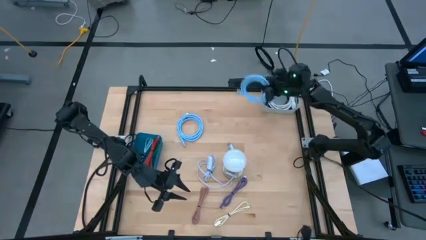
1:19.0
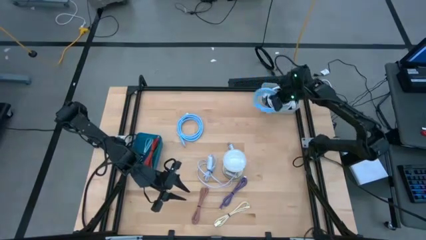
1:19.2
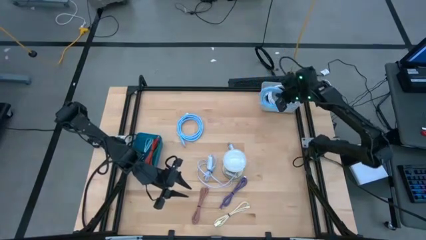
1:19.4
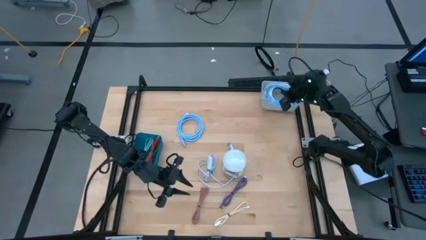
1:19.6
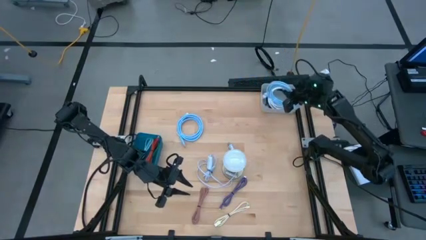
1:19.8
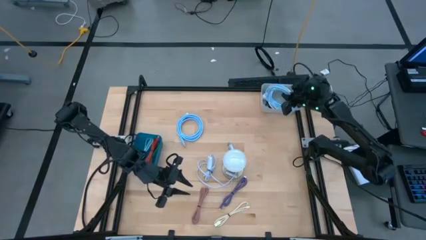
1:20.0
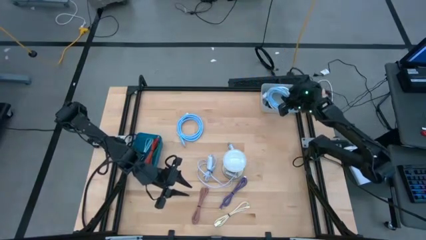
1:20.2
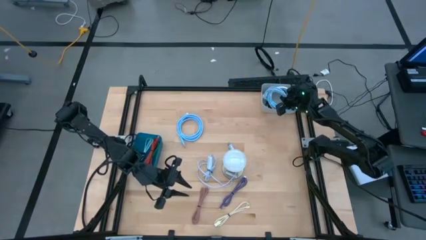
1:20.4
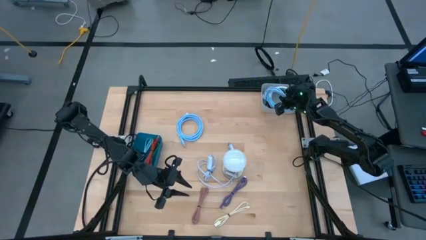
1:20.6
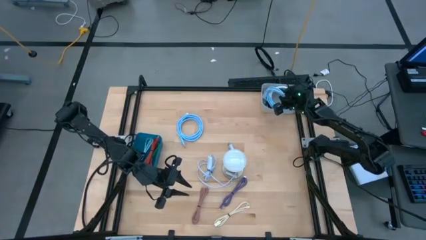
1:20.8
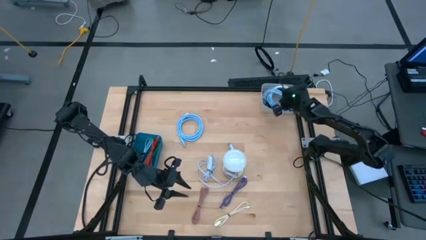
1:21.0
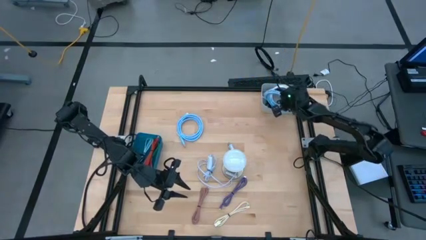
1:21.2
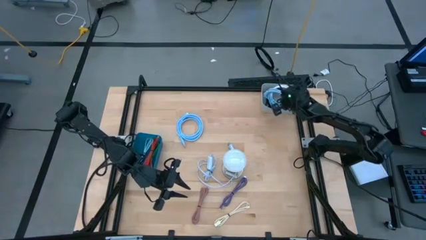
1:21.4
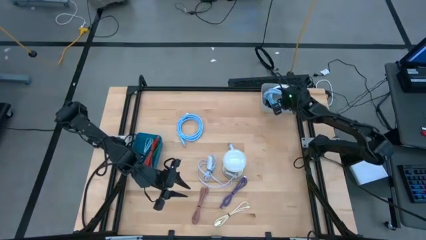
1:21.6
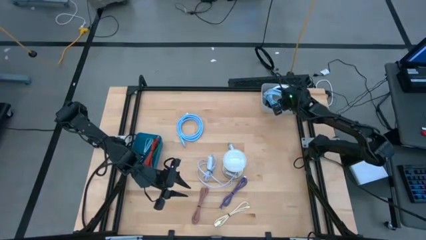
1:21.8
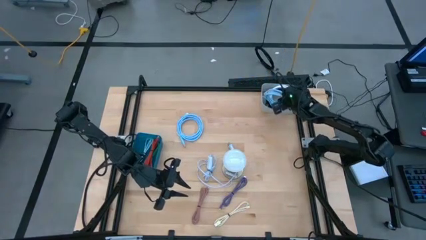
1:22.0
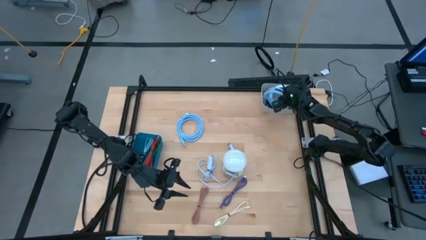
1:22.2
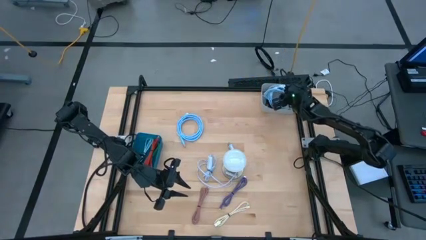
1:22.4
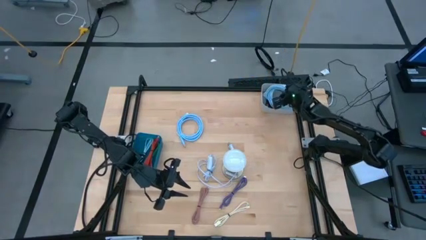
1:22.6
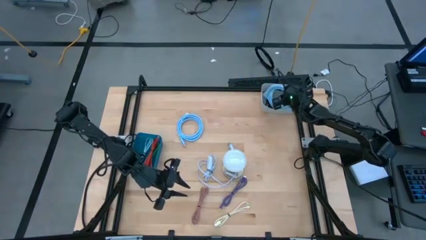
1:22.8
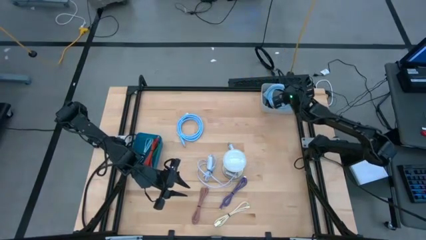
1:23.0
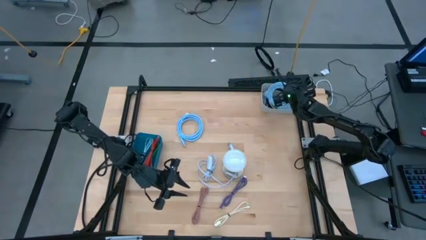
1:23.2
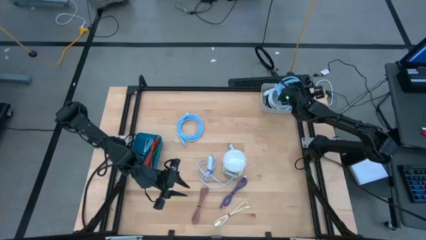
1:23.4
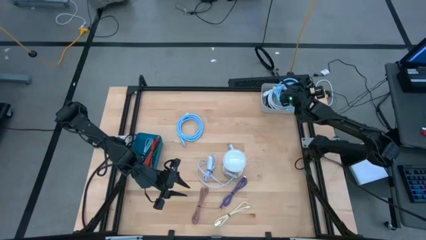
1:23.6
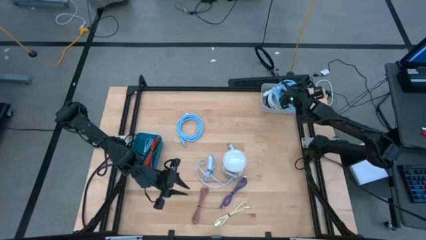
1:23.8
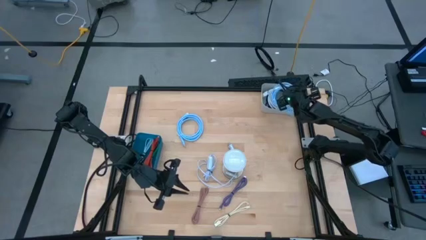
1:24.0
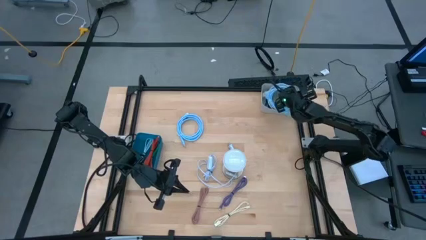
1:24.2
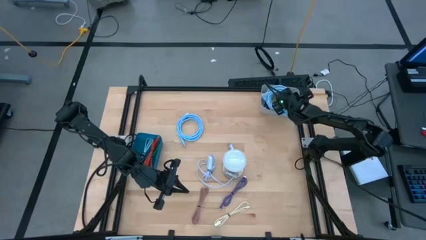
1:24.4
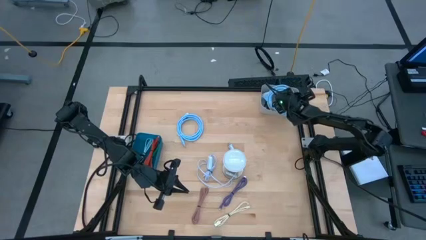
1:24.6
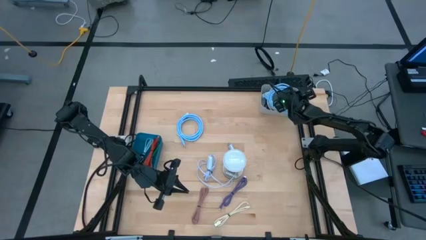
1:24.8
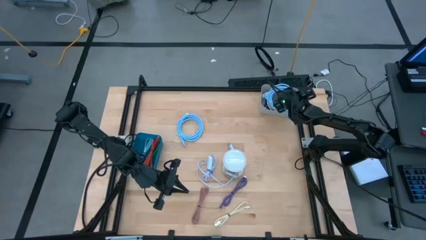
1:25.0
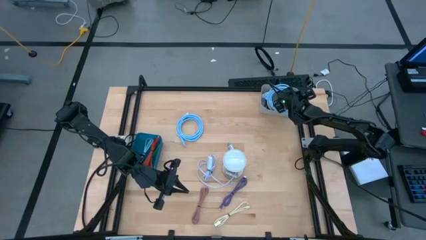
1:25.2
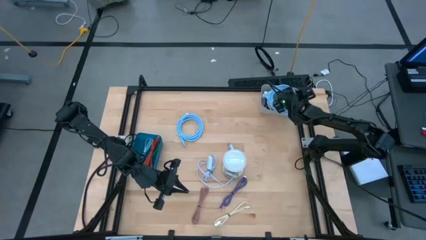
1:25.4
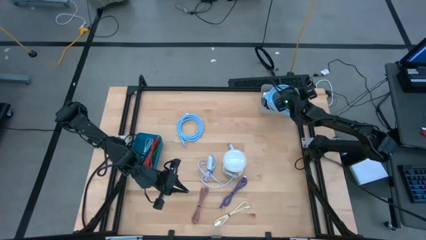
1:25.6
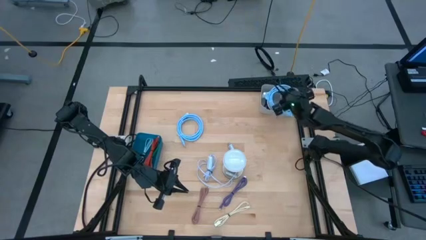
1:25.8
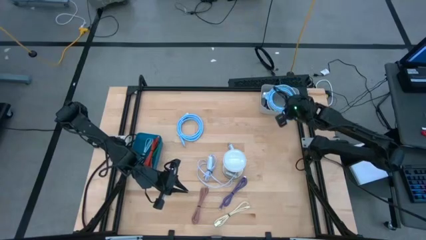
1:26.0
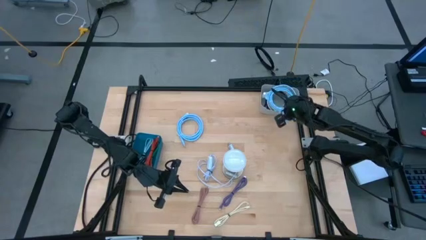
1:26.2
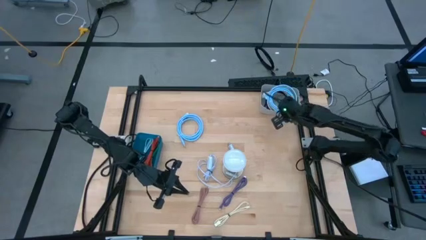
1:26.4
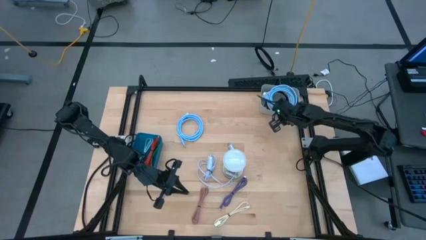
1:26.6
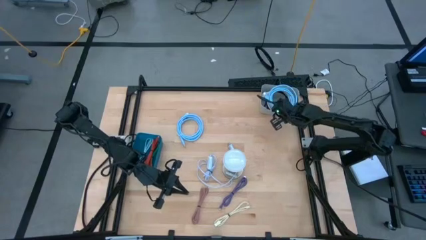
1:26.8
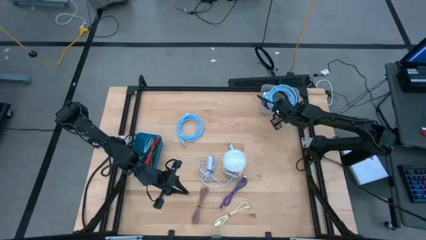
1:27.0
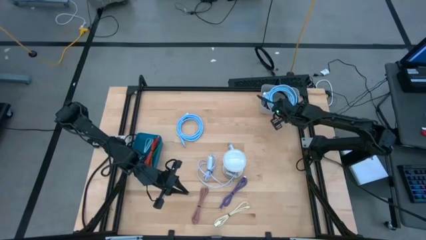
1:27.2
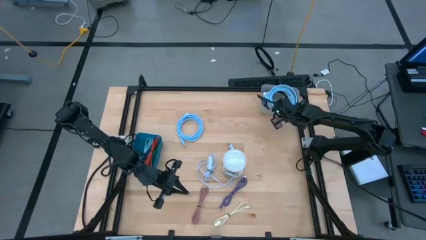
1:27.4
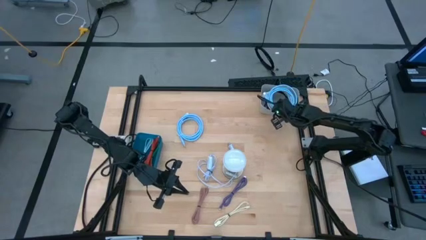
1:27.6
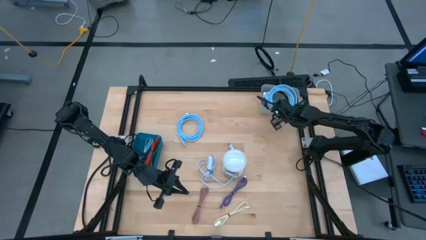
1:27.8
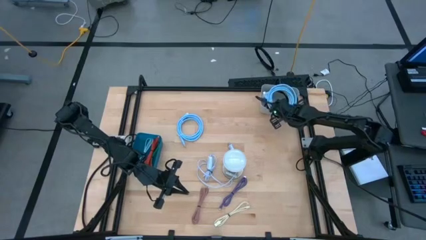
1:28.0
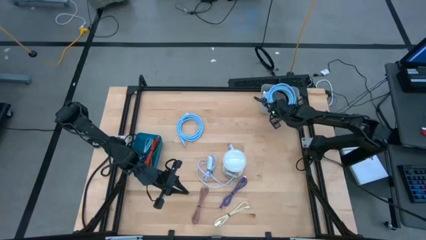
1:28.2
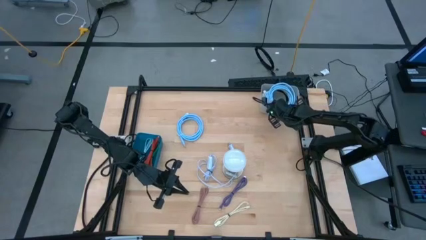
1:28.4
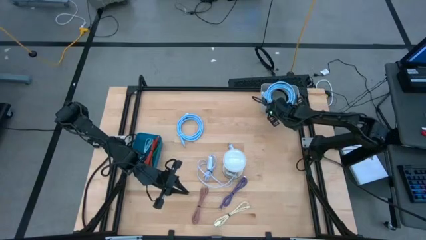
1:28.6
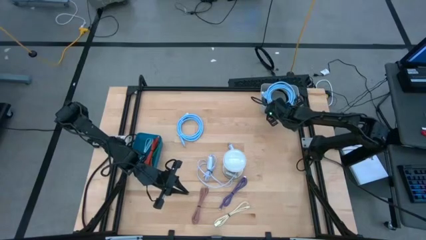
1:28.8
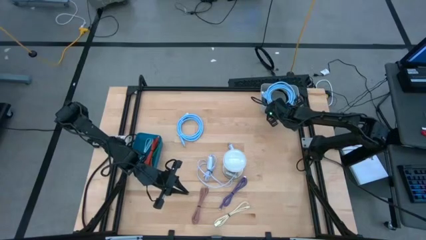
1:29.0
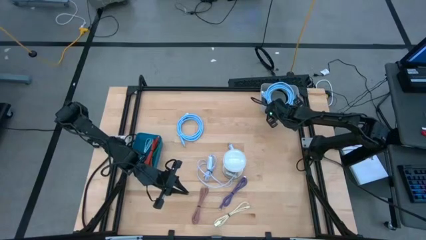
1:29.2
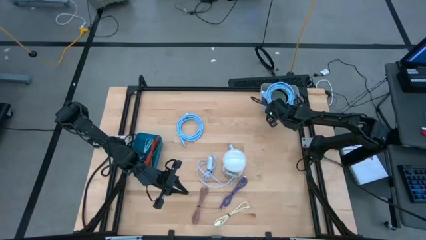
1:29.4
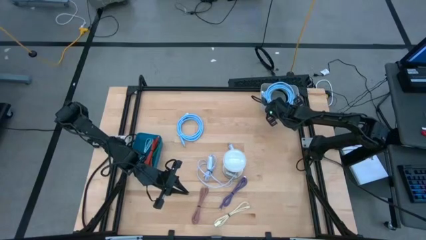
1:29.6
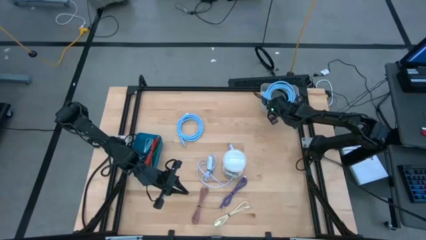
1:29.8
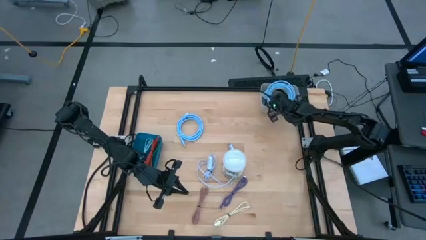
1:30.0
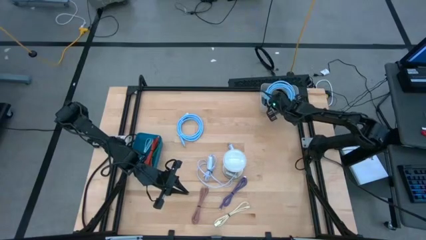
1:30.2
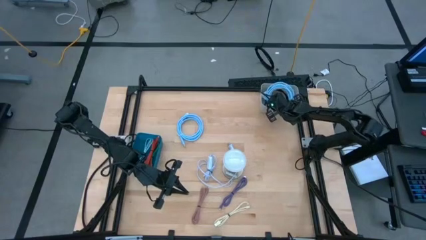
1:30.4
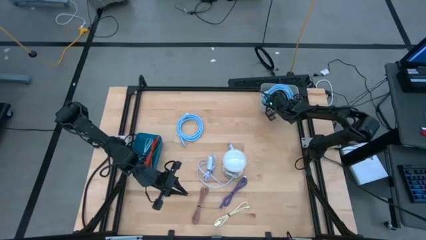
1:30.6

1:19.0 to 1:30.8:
Task: Pick & Place USB Port
Put the right blue HDMI cable into the gray bin

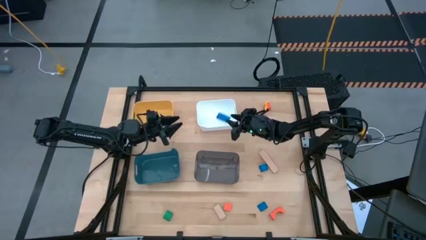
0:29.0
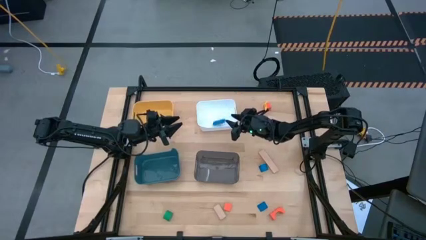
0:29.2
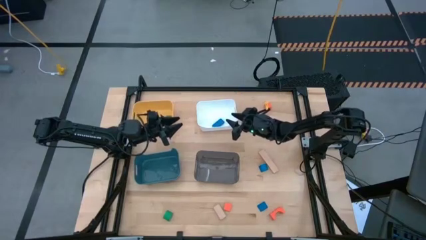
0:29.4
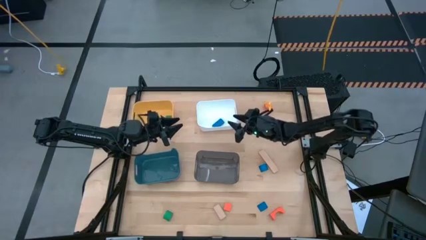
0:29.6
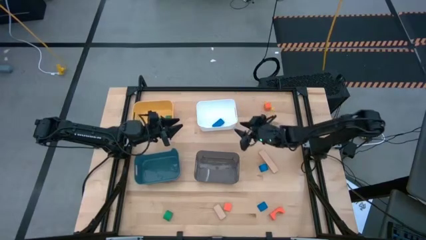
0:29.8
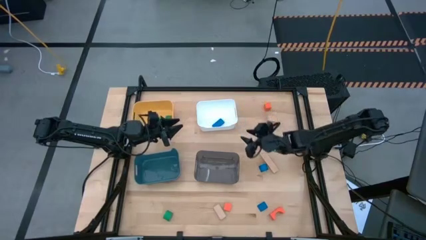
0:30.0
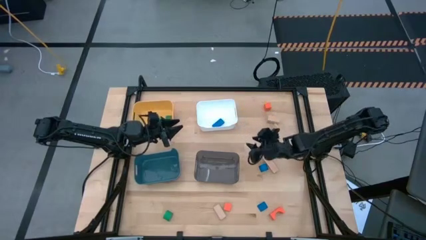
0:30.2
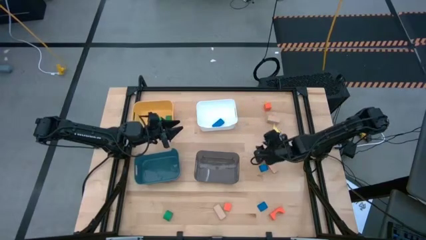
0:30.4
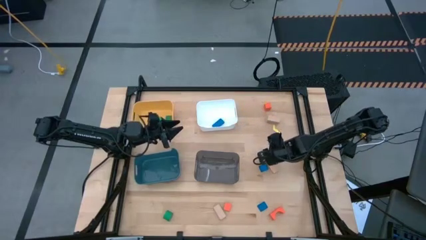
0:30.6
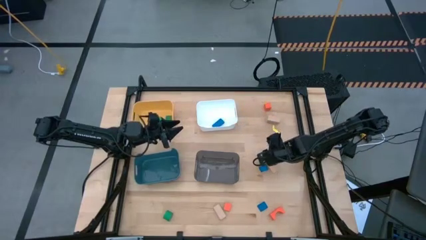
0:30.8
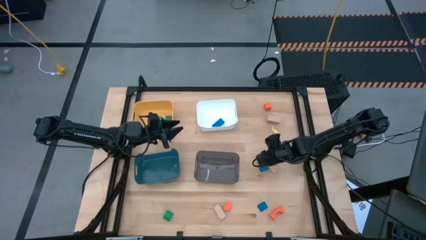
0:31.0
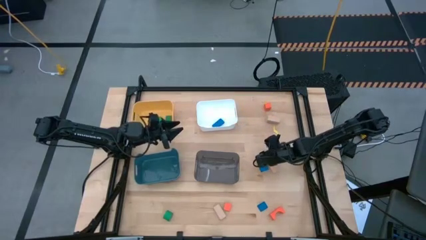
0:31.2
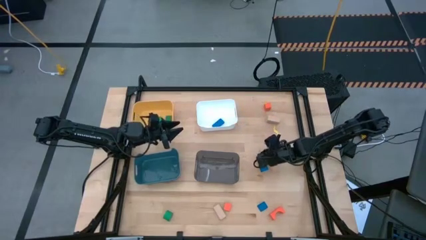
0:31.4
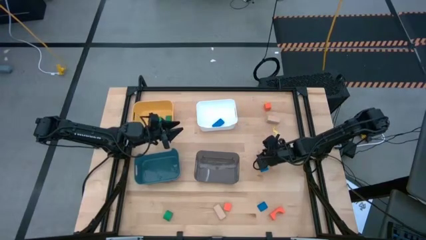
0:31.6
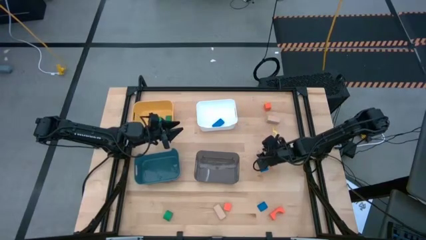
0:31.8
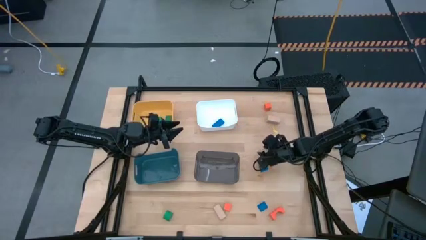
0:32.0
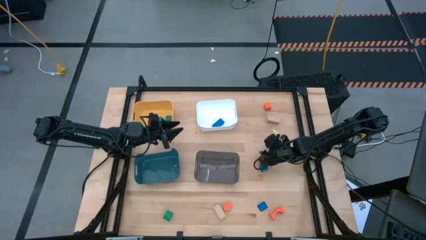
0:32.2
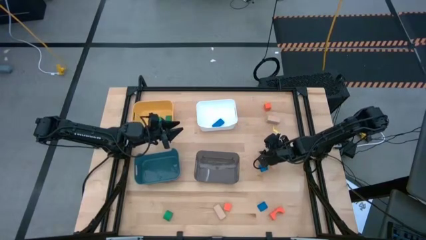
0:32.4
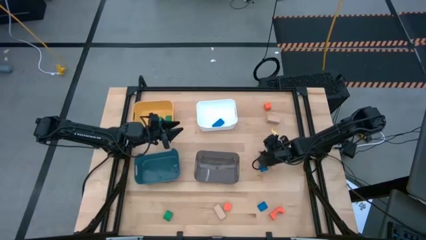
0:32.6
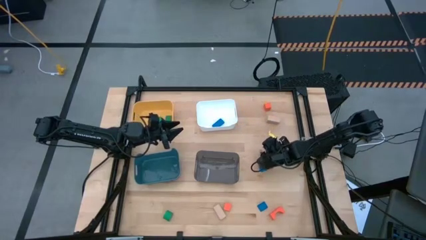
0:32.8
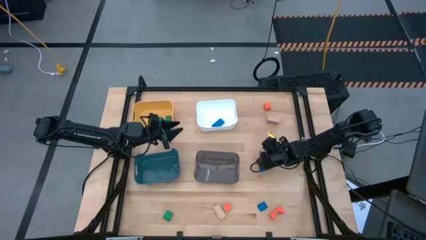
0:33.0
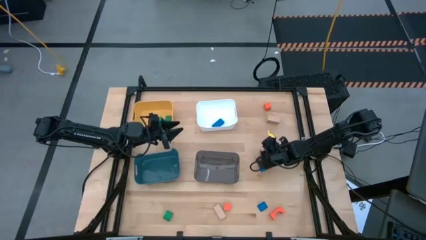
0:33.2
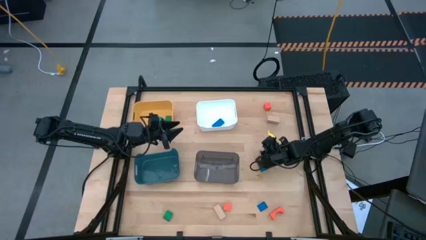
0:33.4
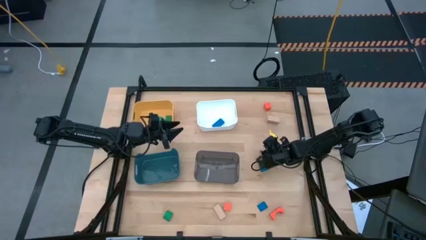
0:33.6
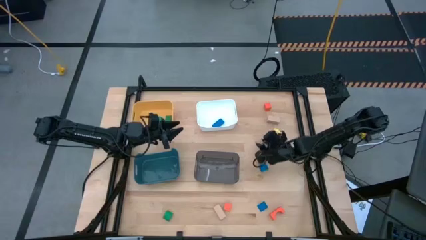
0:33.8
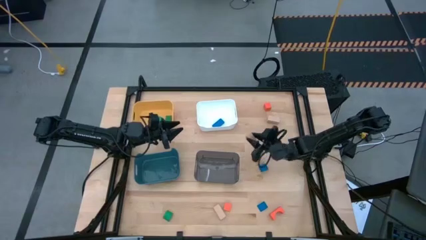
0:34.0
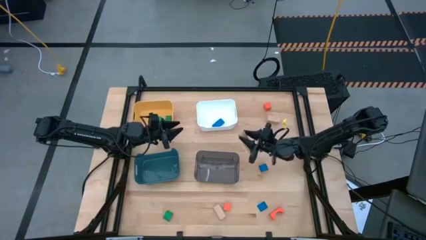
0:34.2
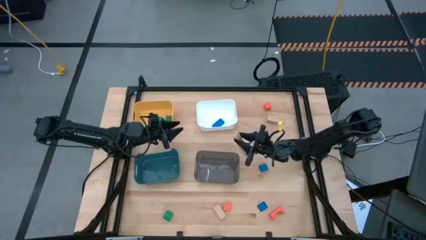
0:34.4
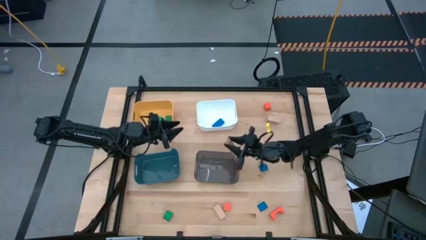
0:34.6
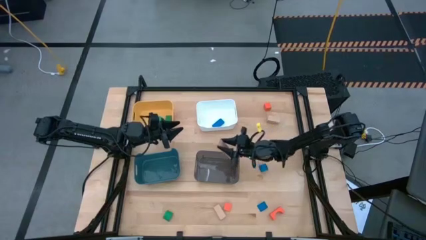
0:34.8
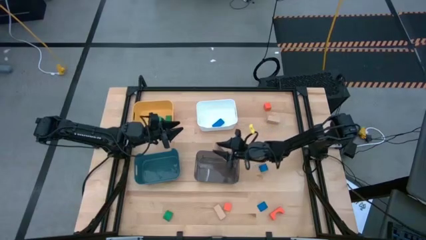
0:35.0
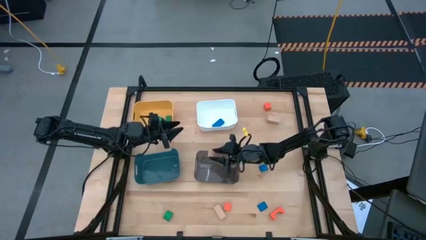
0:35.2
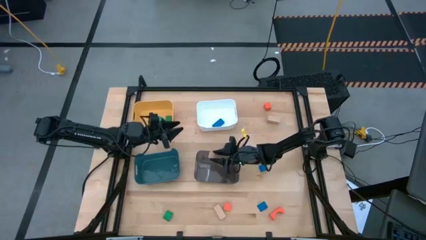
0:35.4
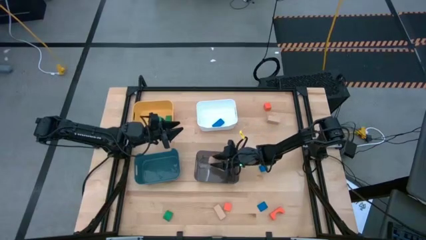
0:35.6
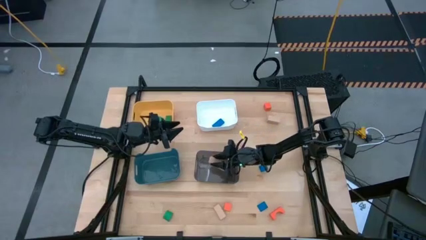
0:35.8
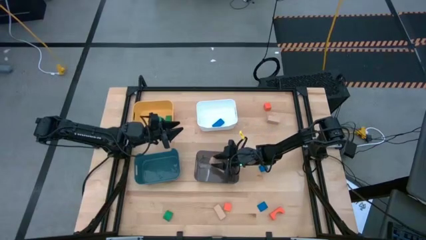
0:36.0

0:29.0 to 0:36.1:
Task: Sort & place blocks by color
Put the middle right brown block into the black bin
